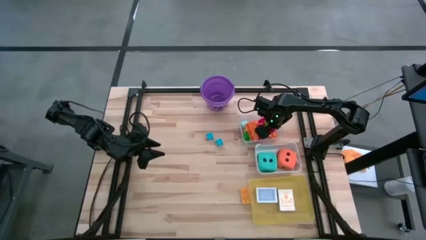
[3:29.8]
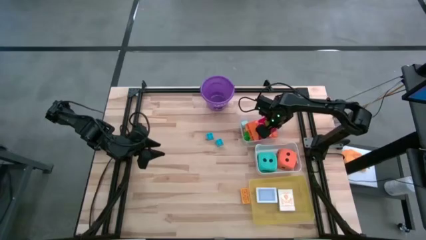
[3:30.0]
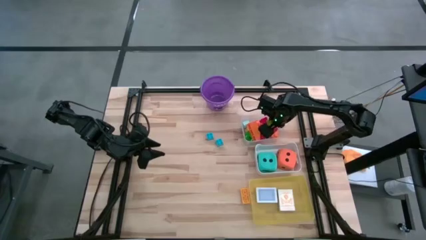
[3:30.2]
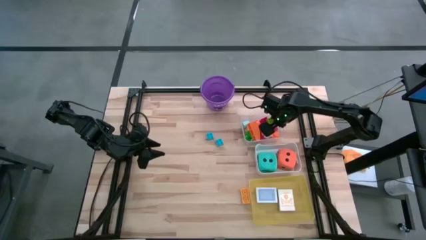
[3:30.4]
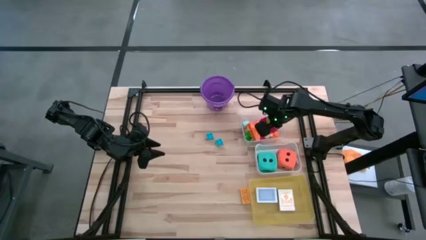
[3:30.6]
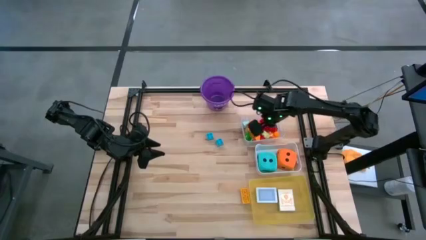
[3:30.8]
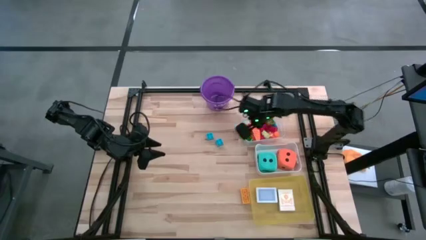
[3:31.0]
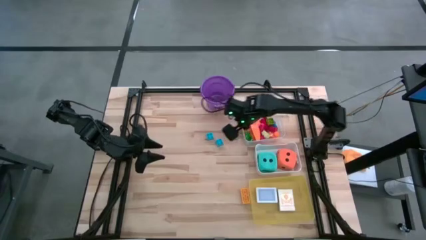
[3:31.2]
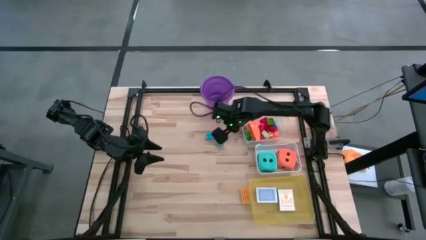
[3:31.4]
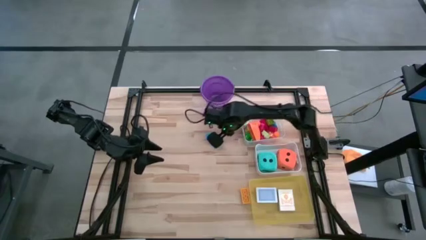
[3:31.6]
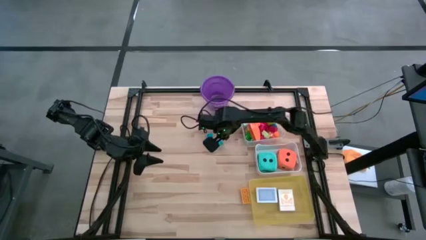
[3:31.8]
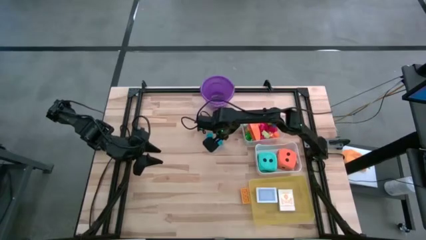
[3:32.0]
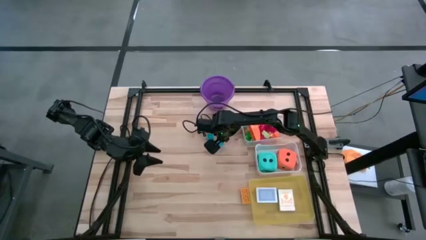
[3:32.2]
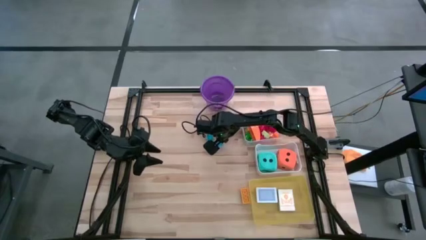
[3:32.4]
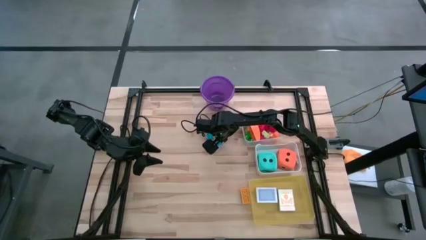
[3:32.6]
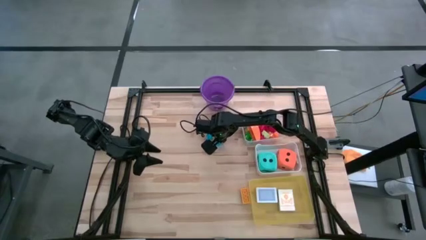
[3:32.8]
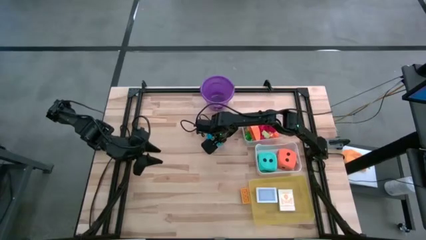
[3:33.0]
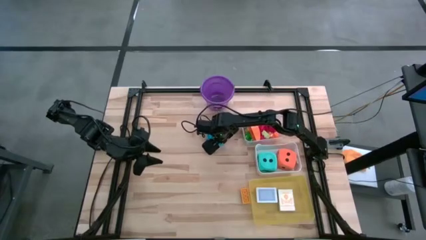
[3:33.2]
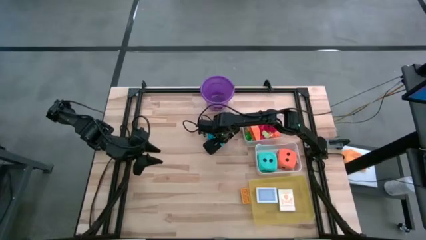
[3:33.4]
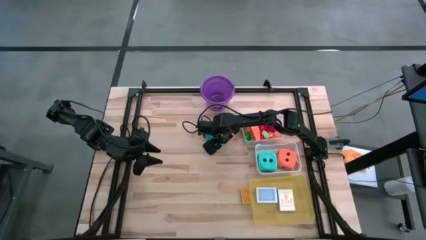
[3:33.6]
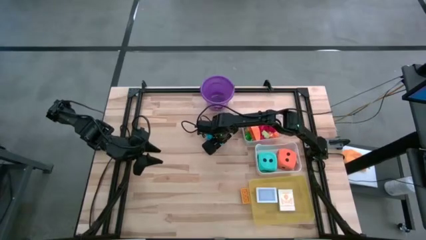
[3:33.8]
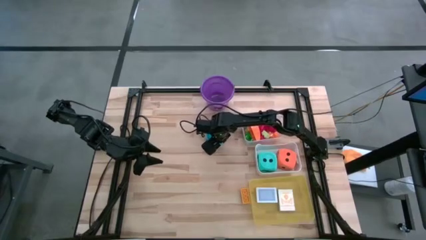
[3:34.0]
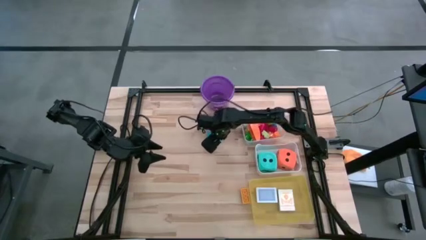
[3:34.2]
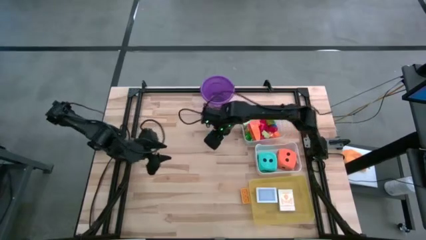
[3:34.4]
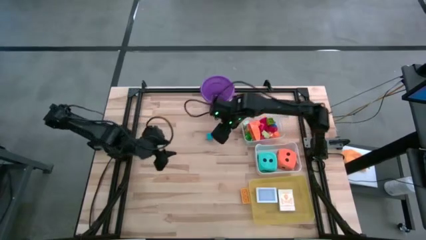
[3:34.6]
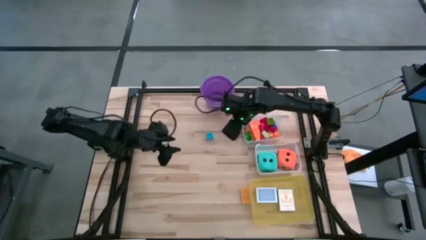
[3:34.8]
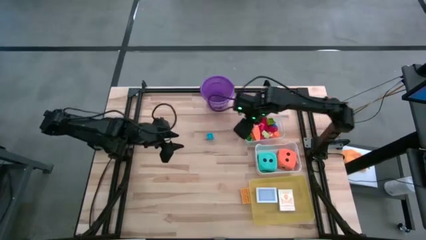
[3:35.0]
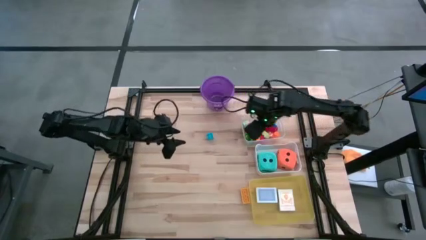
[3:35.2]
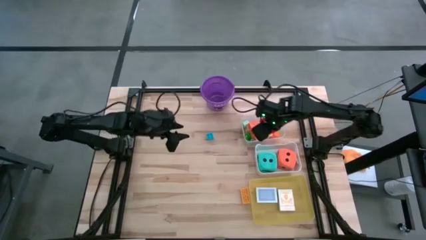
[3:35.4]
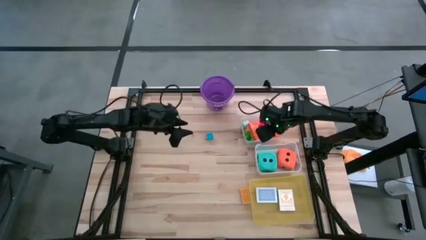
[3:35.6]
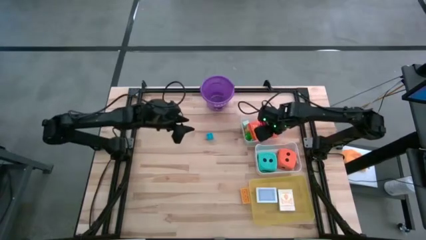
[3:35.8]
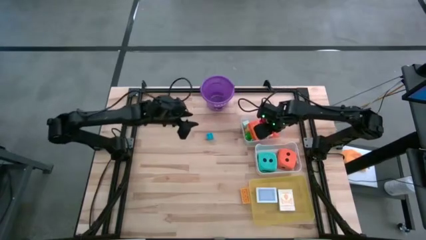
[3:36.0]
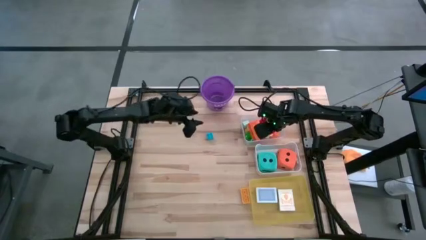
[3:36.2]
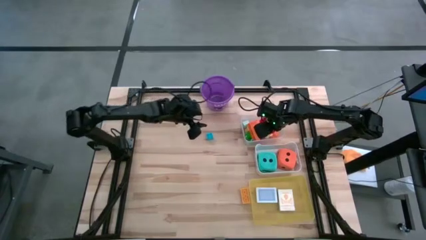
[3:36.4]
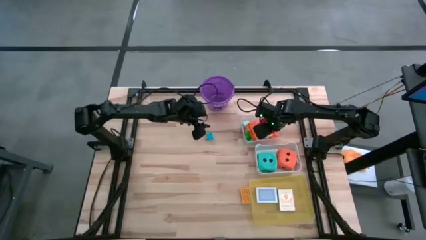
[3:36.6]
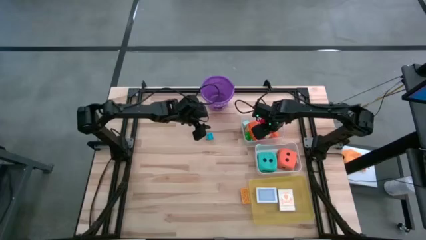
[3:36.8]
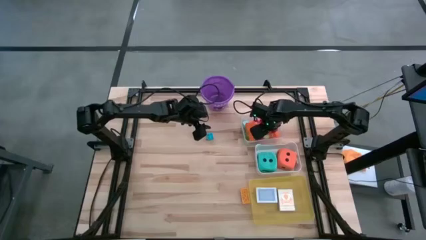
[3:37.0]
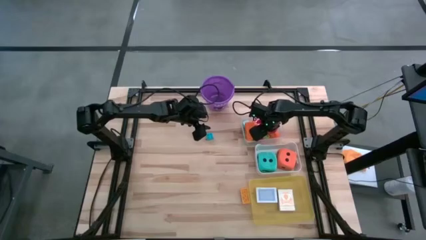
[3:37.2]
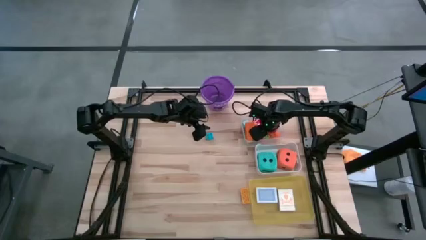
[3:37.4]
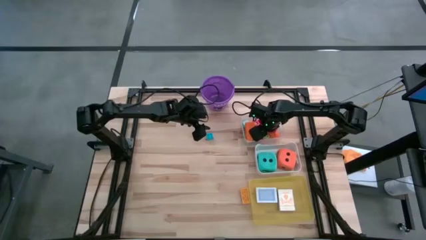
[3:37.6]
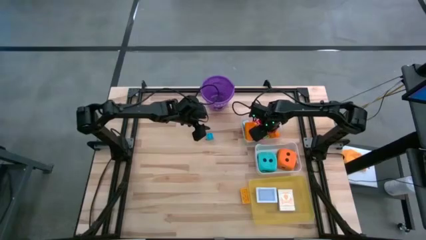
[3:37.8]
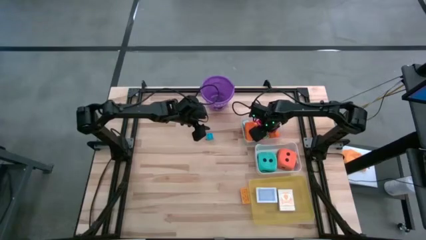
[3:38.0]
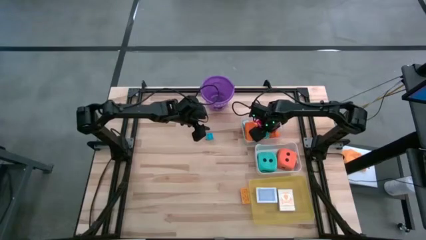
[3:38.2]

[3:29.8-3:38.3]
Task: Pick & Place Toys
Put the blue game piece into the transparent bin

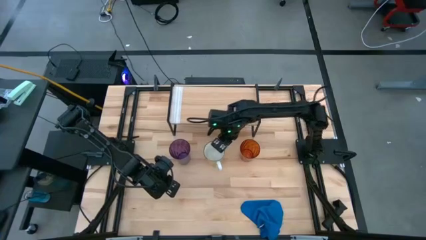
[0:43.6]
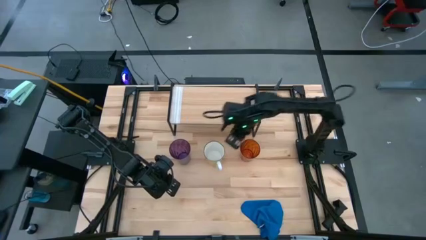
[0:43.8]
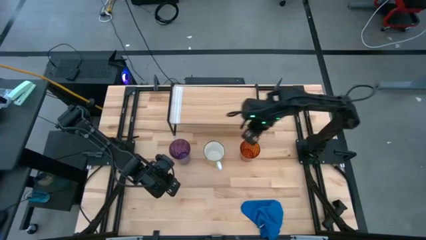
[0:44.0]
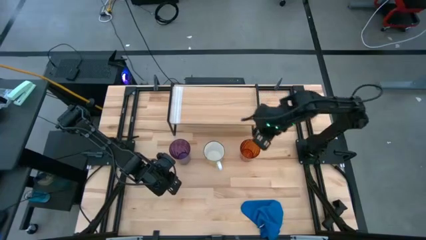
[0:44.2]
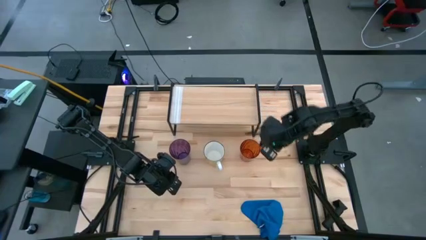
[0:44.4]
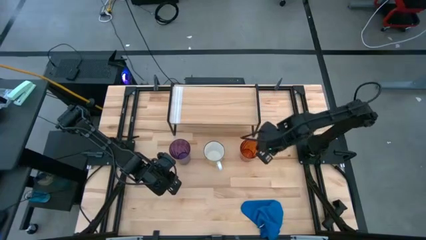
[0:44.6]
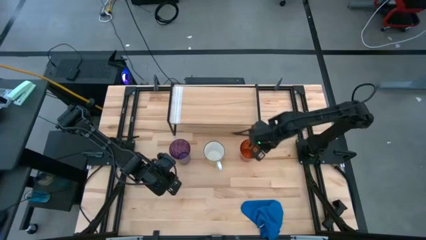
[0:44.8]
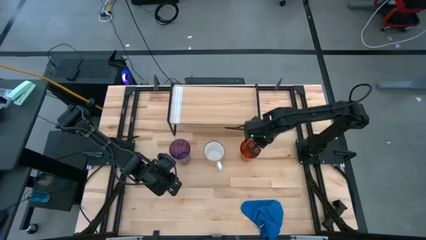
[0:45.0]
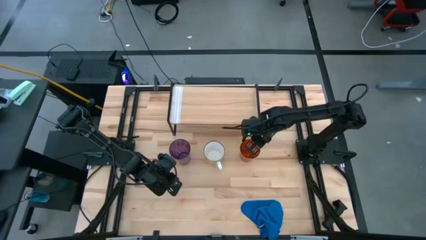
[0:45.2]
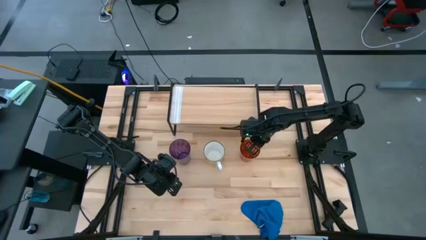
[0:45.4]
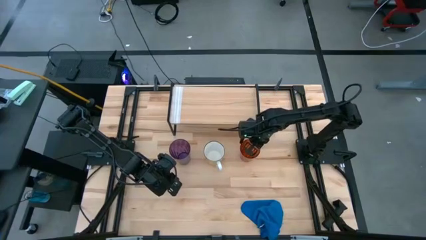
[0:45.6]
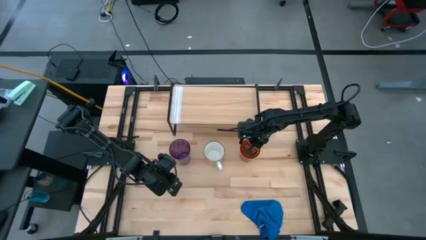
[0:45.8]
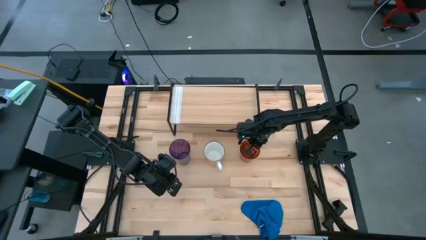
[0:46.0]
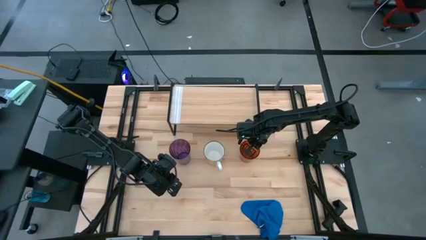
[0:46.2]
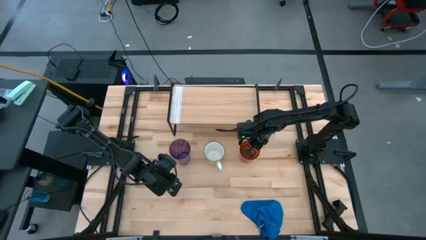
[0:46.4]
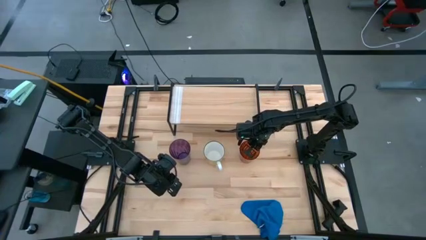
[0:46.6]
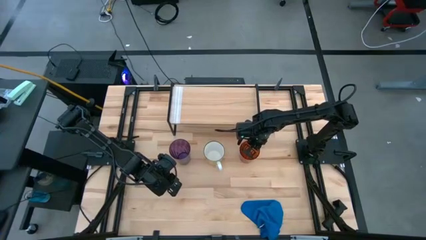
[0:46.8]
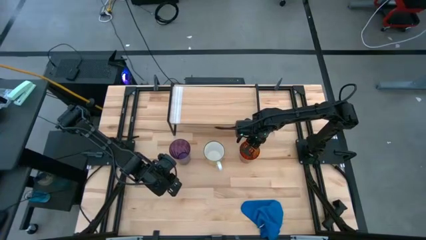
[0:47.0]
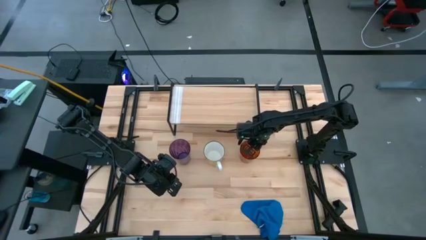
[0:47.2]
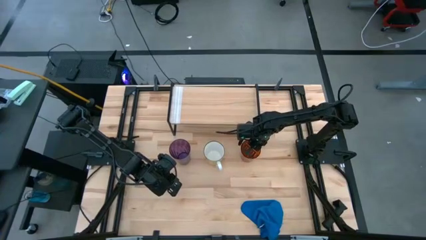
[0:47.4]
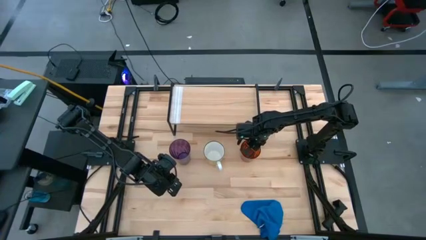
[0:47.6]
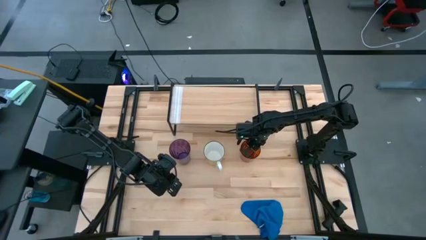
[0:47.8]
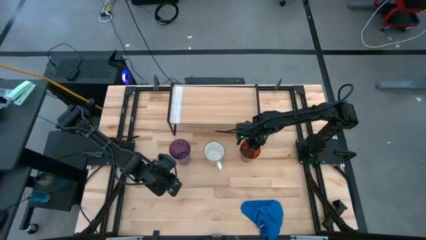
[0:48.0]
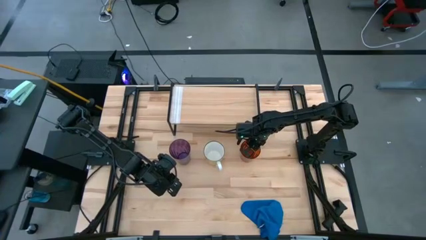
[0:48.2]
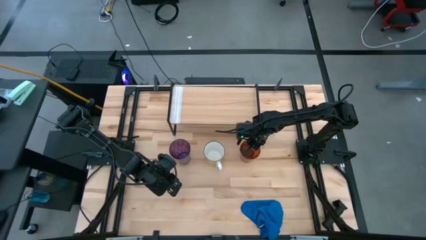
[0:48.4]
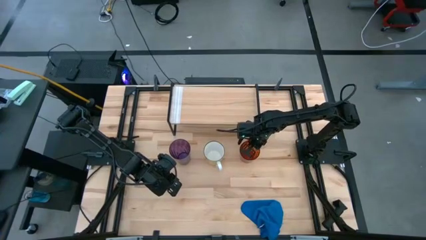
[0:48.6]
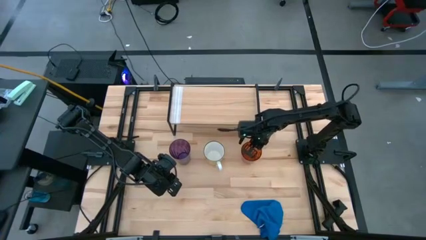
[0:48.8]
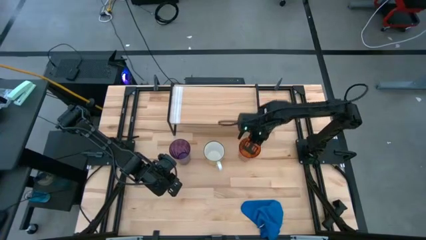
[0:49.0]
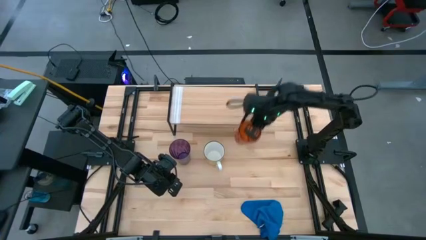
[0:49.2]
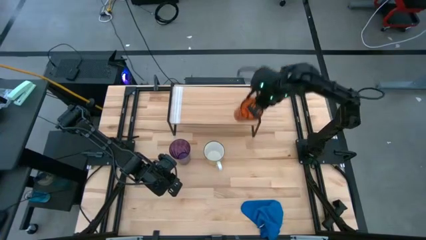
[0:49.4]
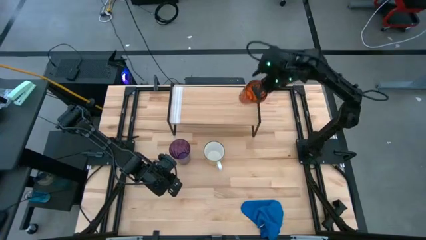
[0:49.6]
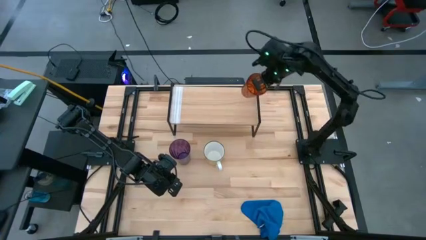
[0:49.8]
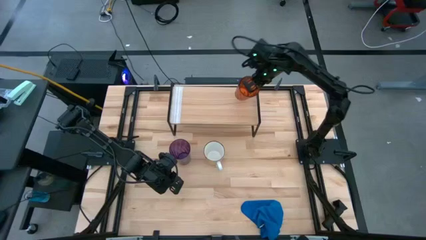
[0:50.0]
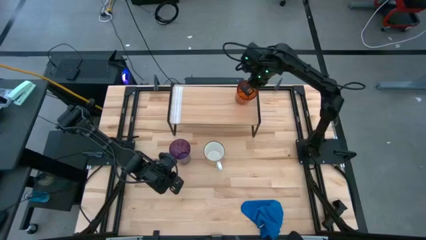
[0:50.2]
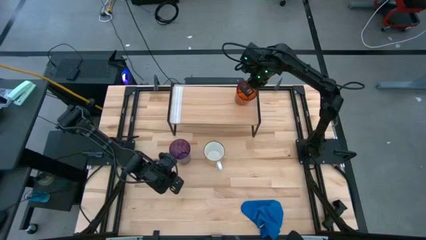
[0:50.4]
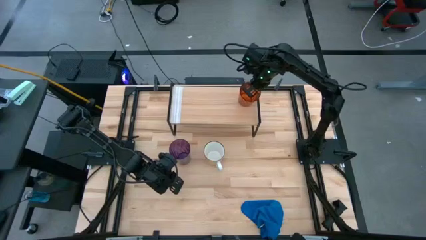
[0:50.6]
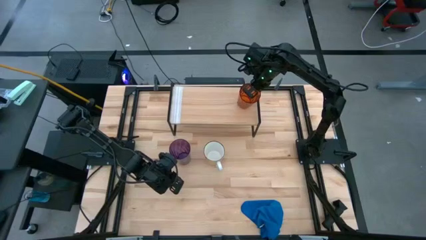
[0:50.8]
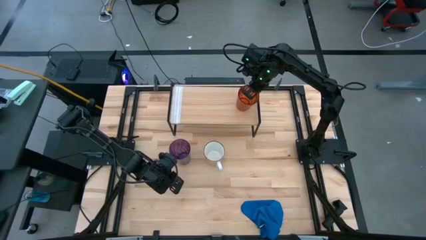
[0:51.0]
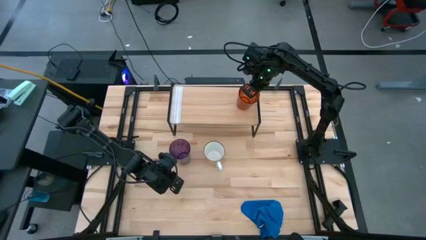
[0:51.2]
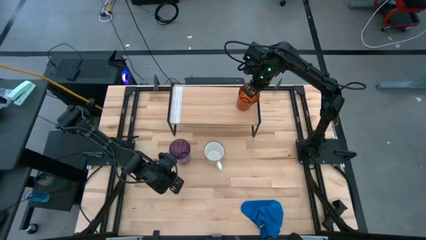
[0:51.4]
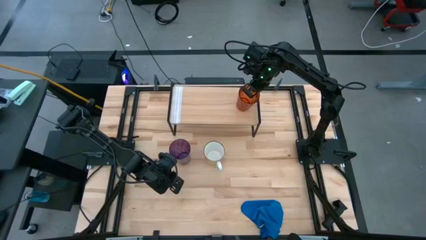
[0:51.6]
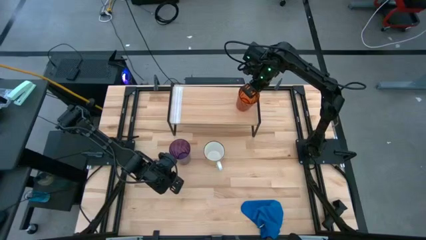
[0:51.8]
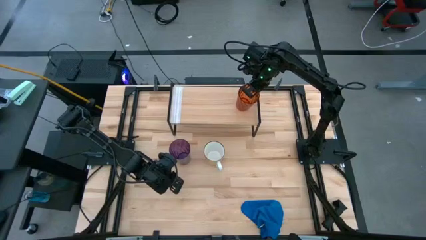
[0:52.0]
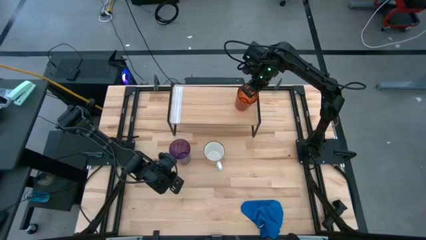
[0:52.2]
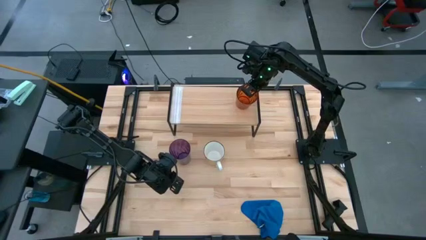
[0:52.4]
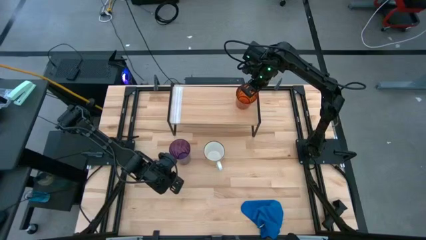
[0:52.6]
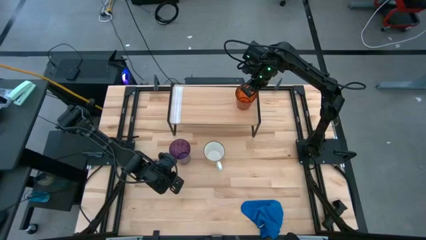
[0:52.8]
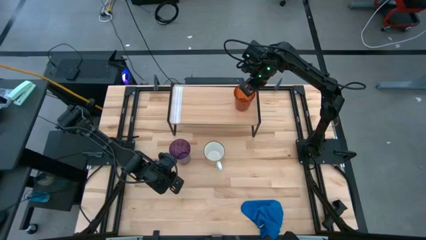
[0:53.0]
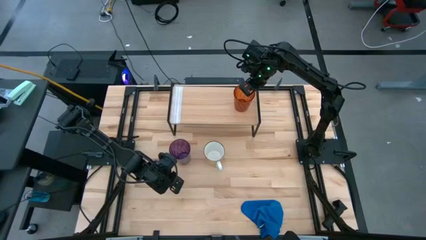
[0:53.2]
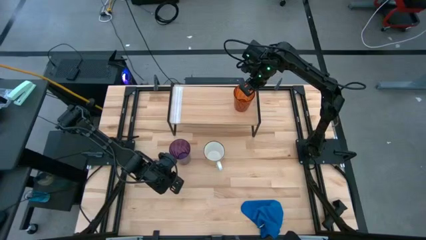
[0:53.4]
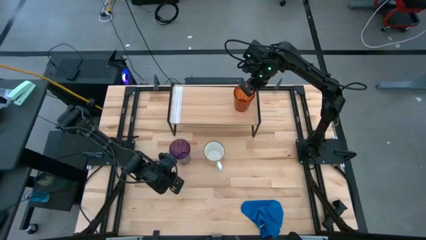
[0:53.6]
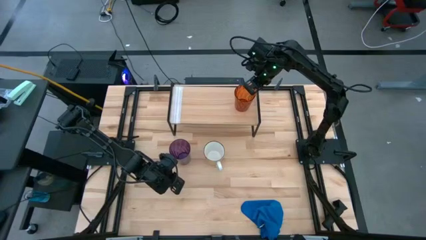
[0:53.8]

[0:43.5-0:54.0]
Task: Stack small to large cups/mugs on shelf
Put the orange glass on the shelf
